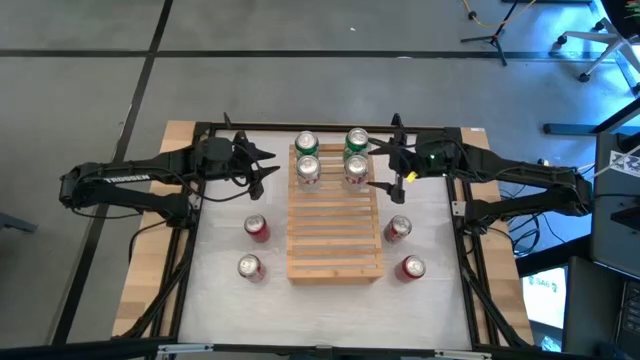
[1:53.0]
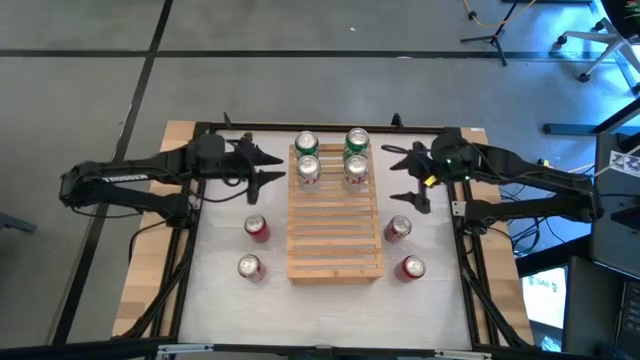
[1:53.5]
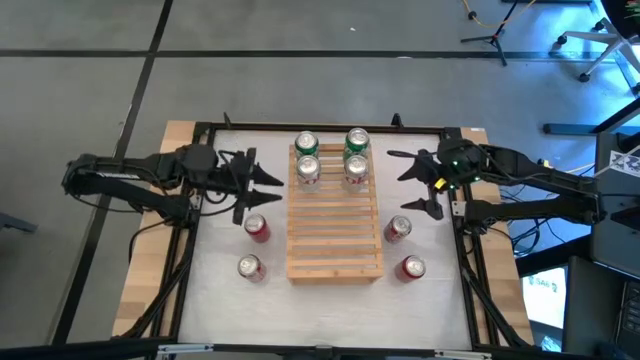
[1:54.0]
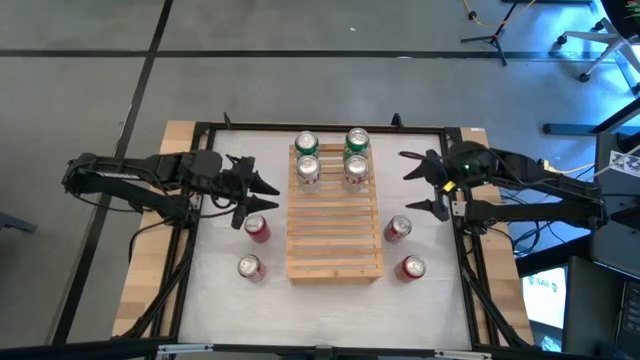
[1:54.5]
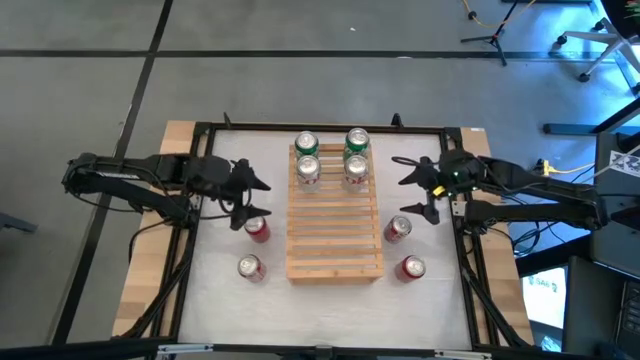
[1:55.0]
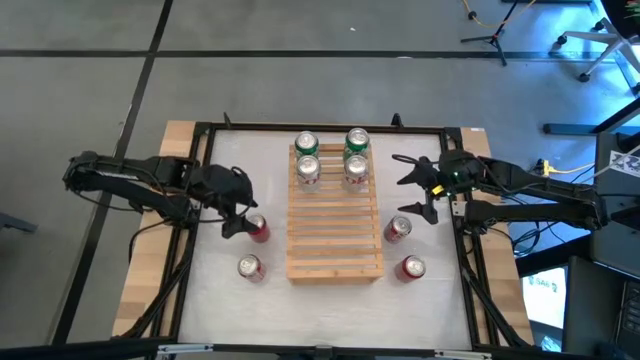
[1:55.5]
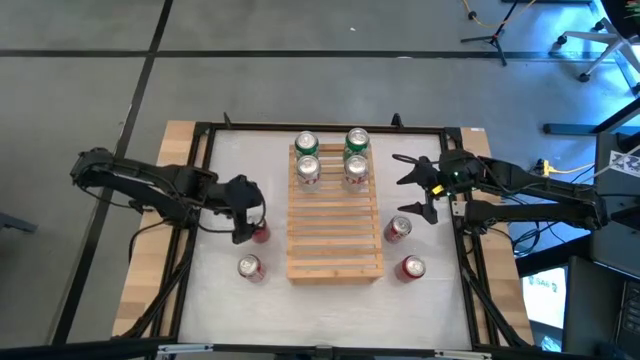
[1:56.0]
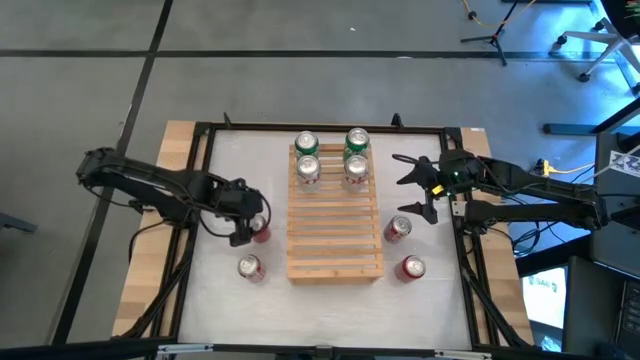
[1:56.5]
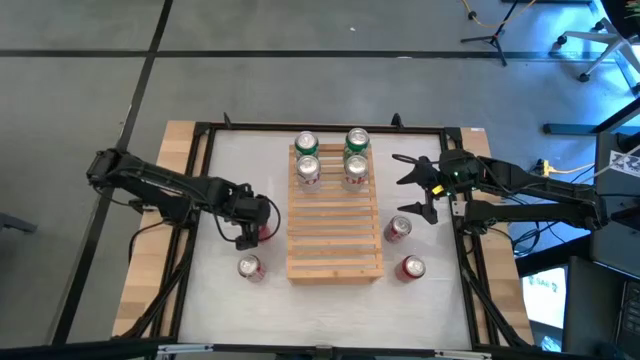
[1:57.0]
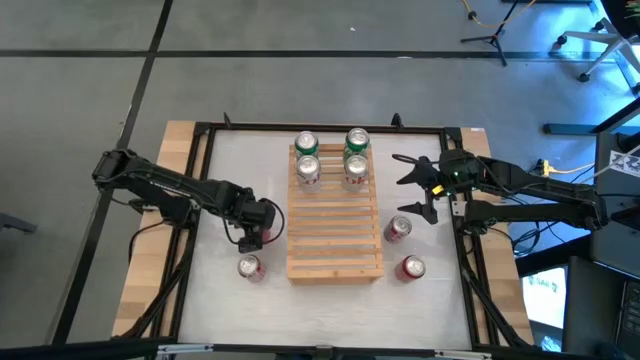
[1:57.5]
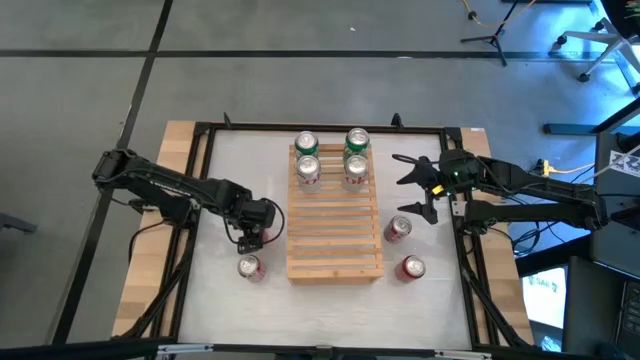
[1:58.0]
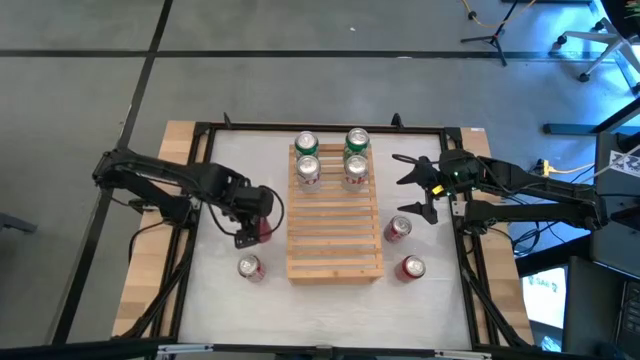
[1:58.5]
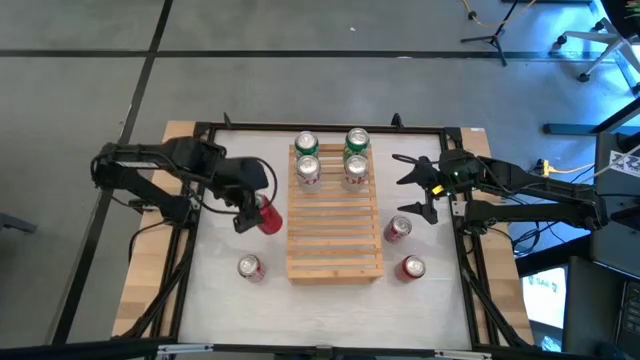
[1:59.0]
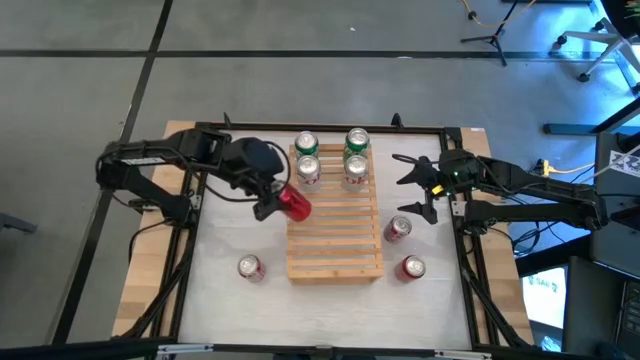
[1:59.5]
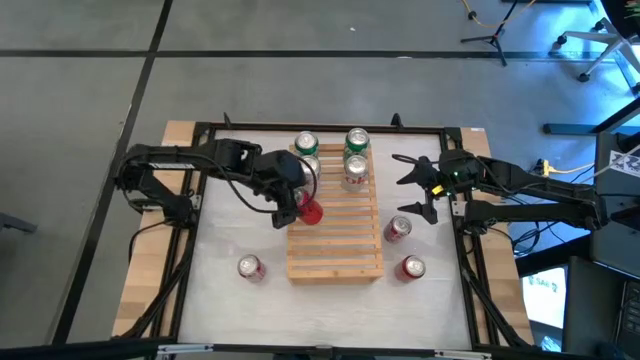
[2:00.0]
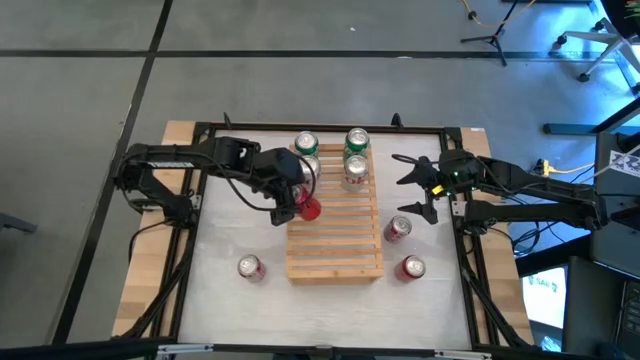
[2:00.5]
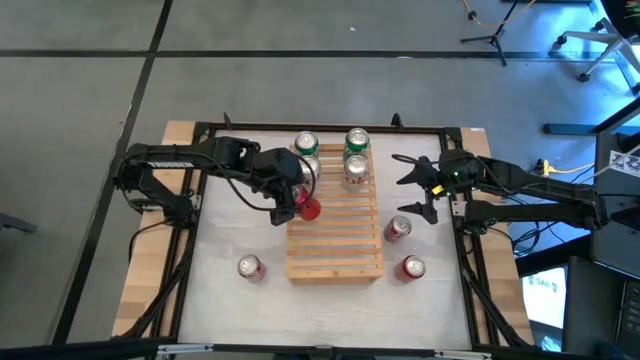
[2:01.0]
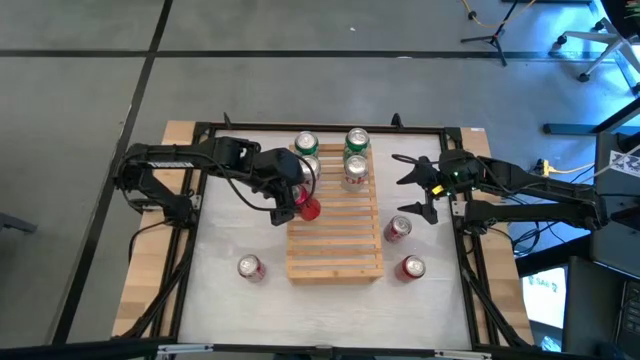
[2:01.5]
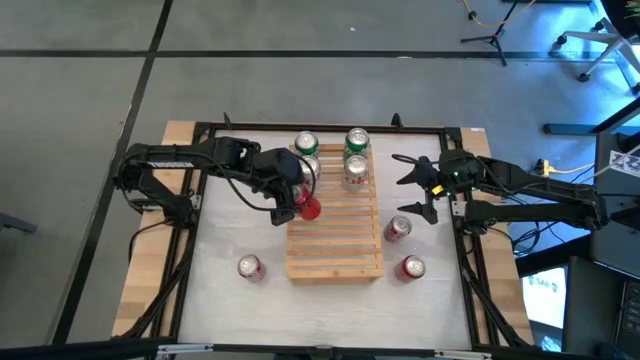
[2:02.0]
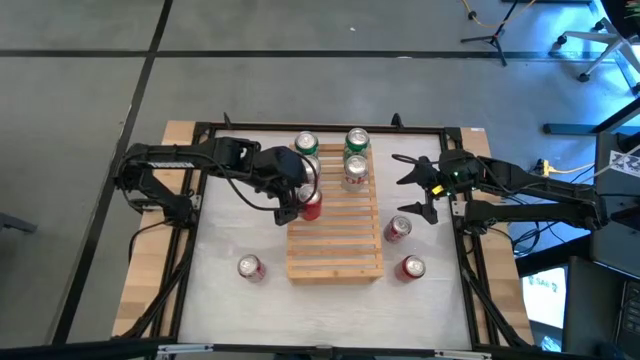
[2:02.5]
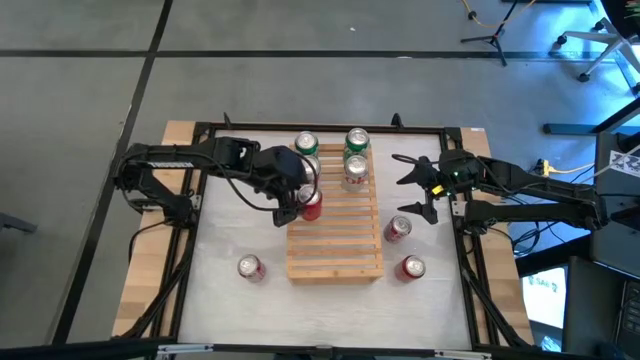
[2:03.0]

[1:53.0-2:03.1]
Task: Place canned beverage on shelf
Put the left red and black soda can on the shelf

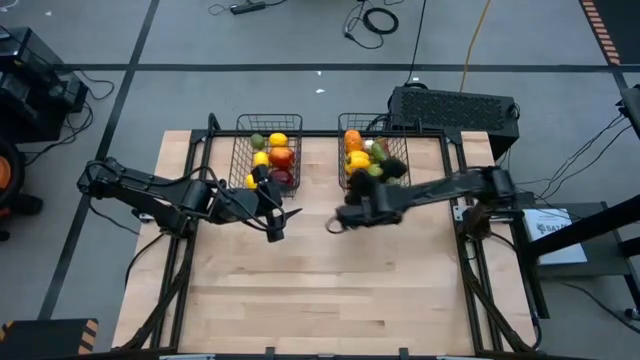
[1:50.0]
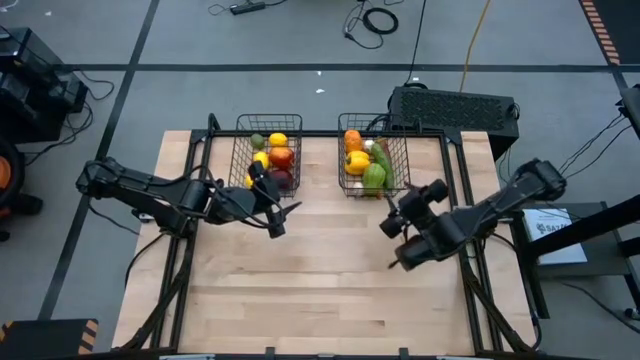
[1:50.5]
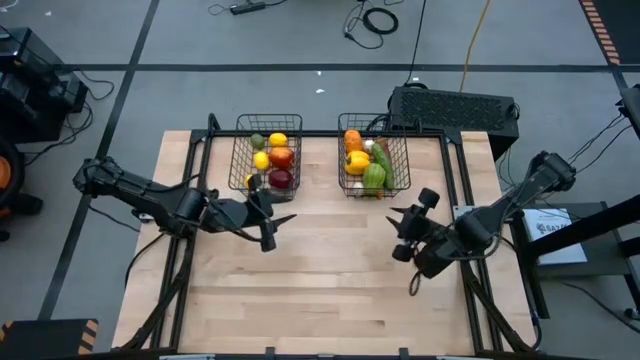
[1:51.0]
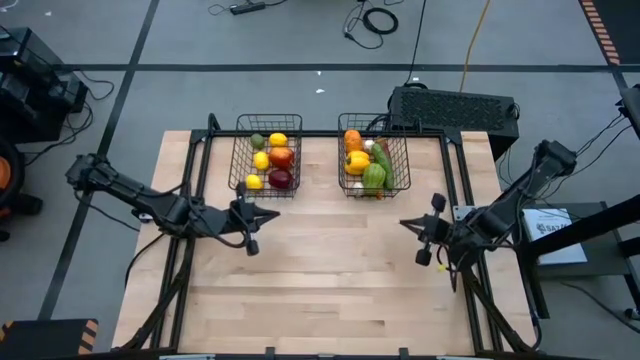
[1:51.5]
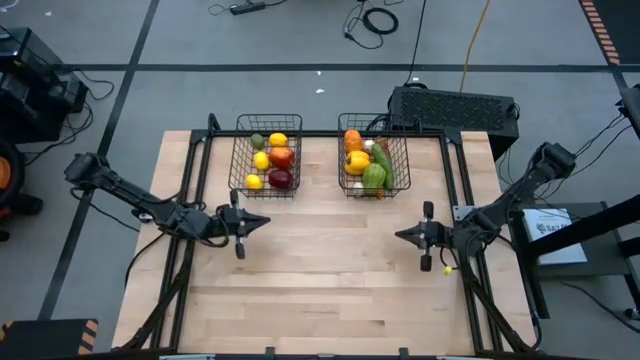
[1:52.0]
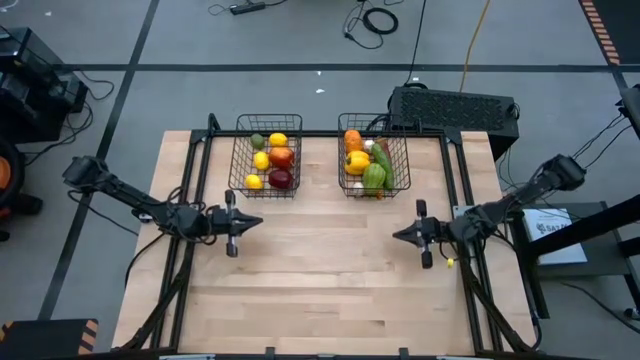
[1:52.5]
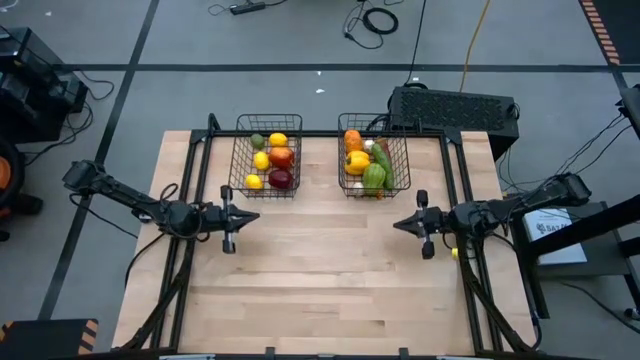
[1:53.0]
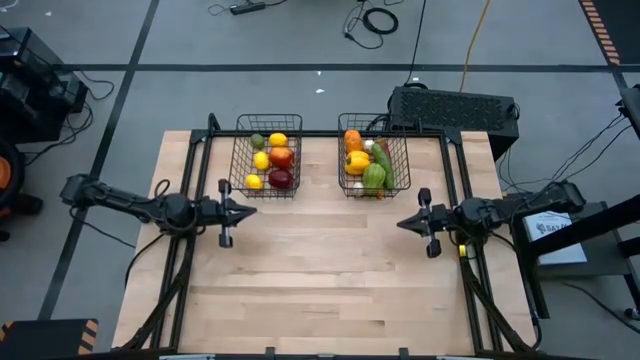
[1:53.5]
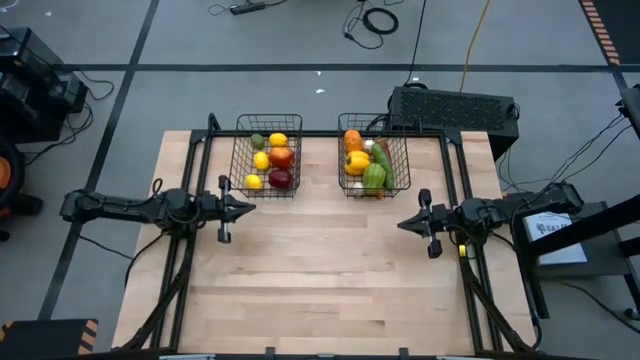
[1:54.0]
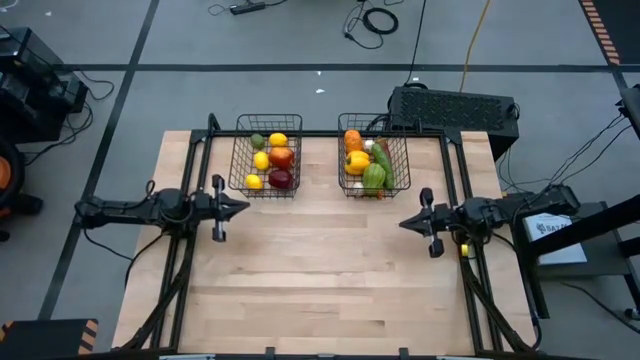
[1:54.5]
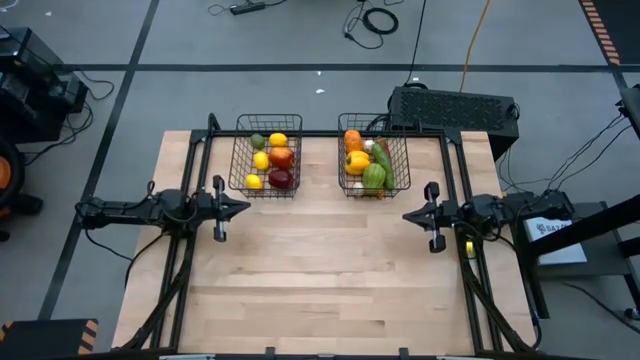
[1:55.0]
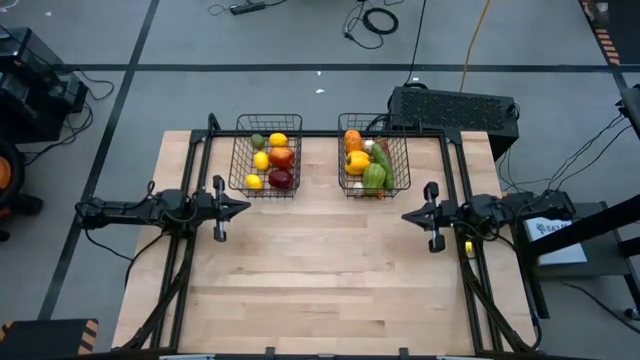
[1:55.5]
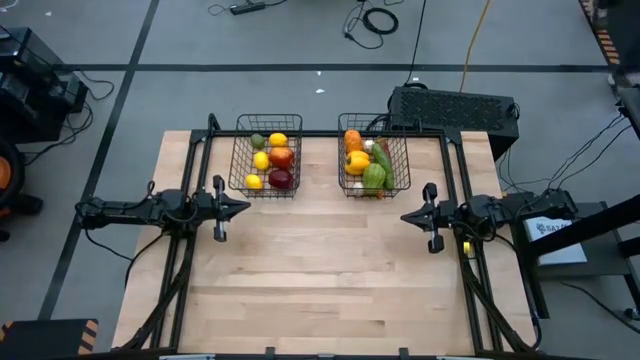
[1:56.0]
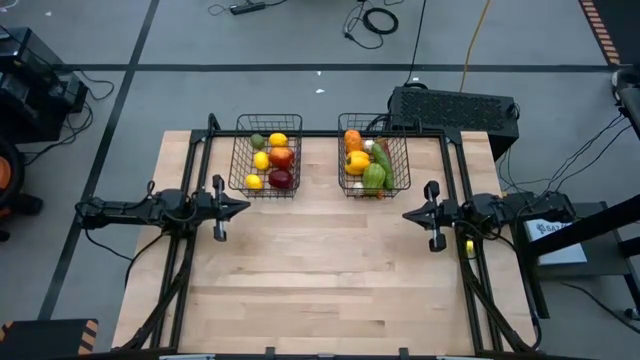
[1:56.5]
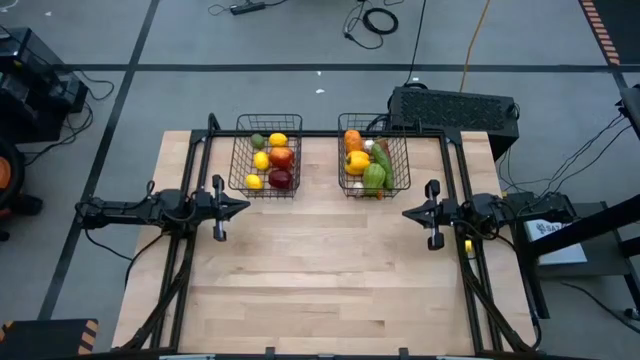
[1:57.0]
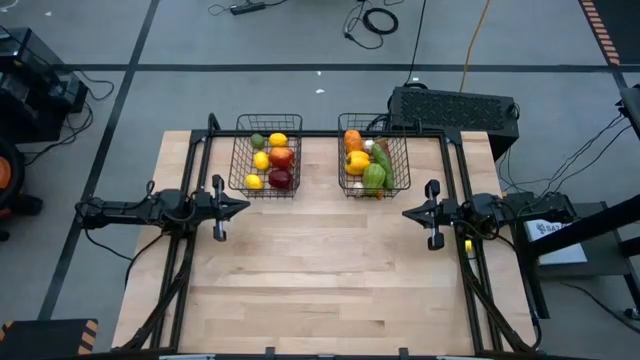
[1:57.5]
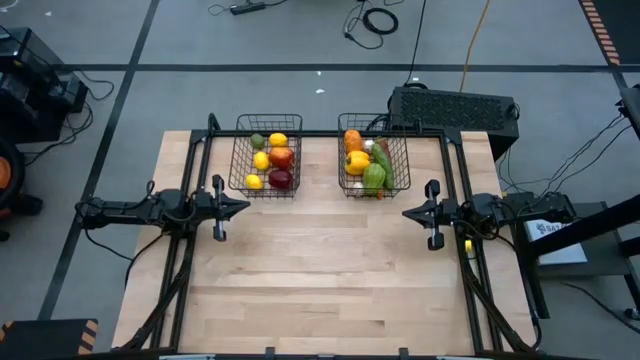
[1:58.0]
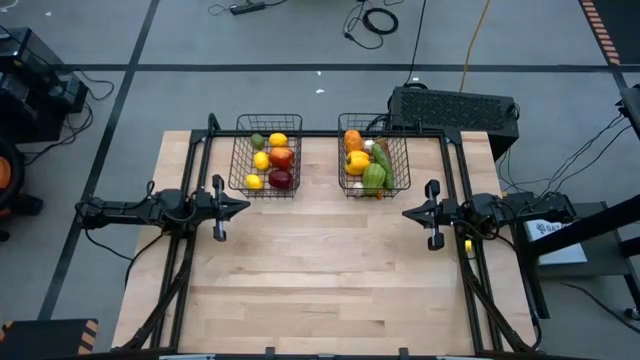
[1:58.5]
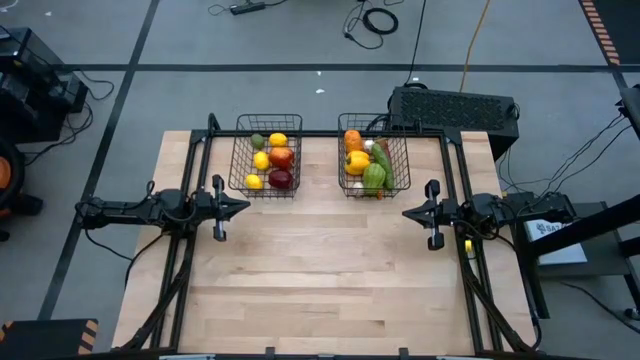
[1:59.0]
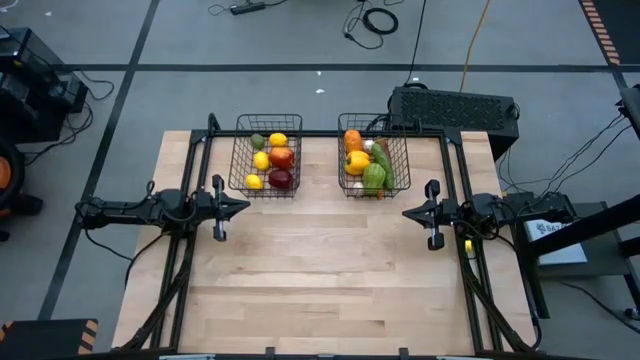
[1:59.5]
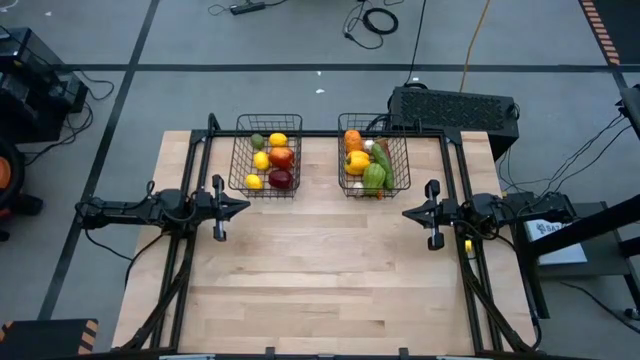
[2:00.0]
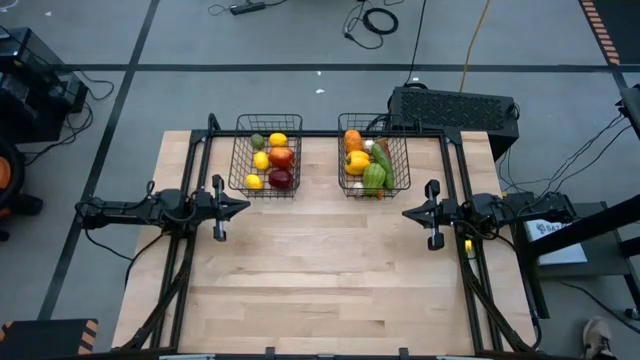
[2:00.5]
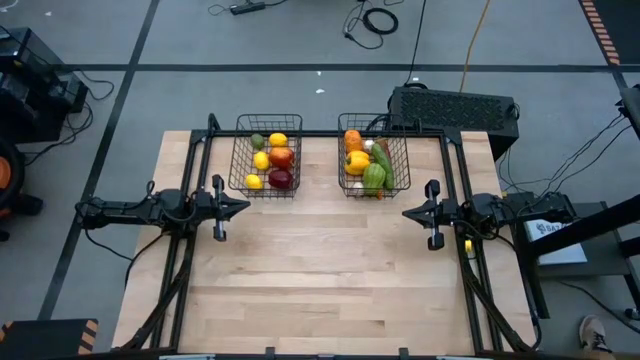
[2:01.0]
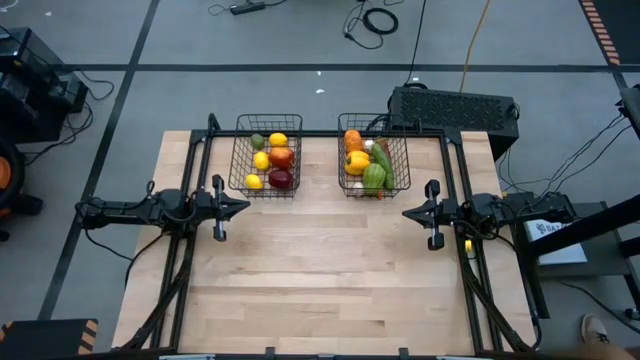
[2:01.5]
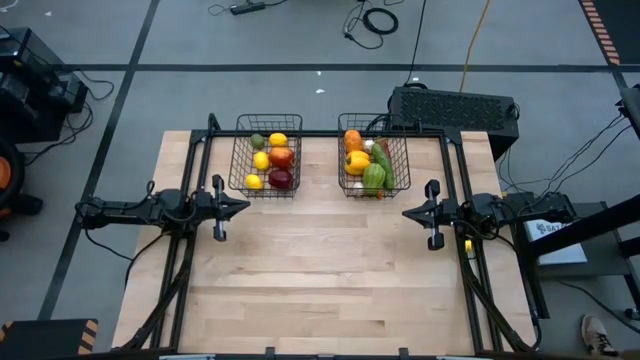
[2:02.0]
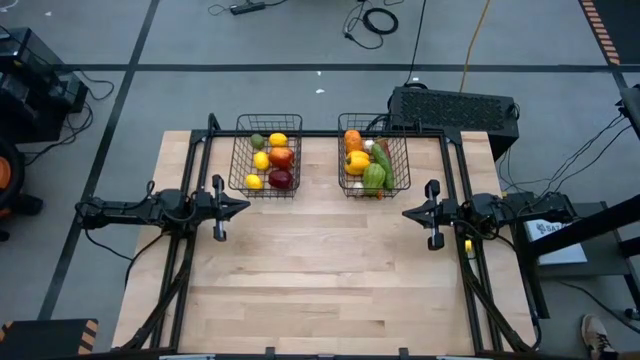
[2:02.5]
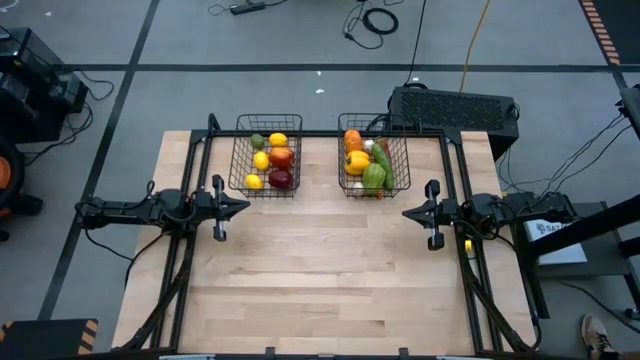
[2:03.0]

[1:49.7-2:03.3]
Task: Sort produce into baskets
Return to Home Position
